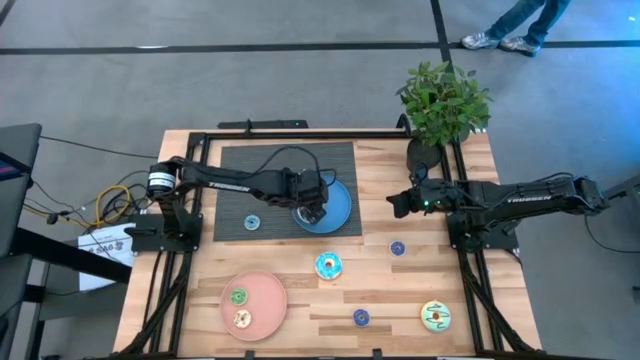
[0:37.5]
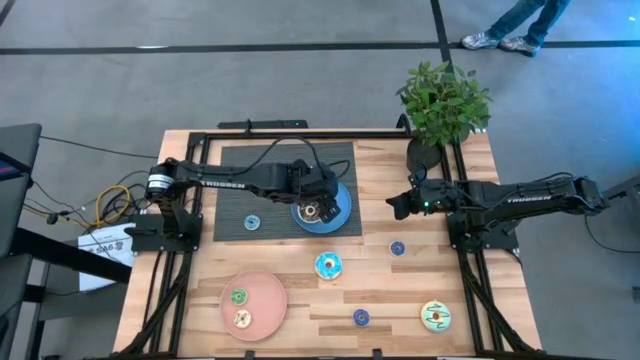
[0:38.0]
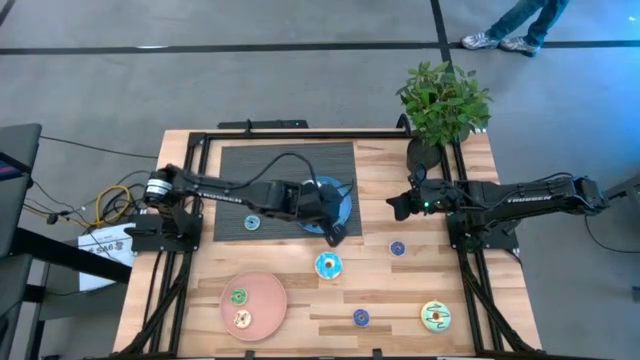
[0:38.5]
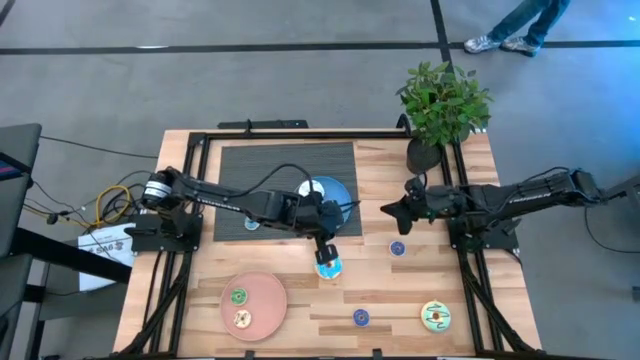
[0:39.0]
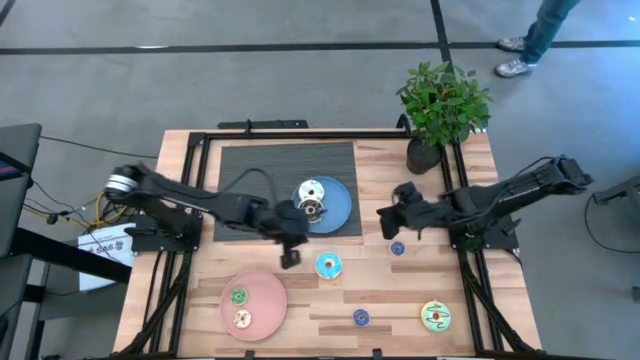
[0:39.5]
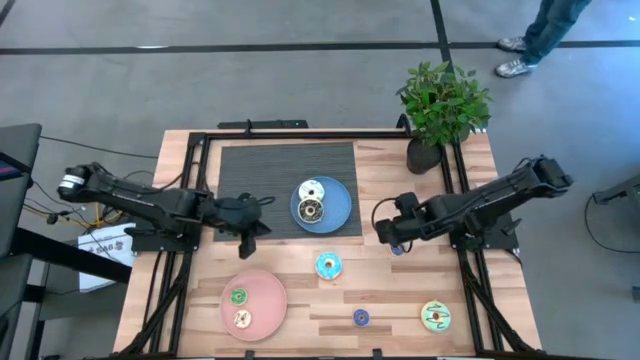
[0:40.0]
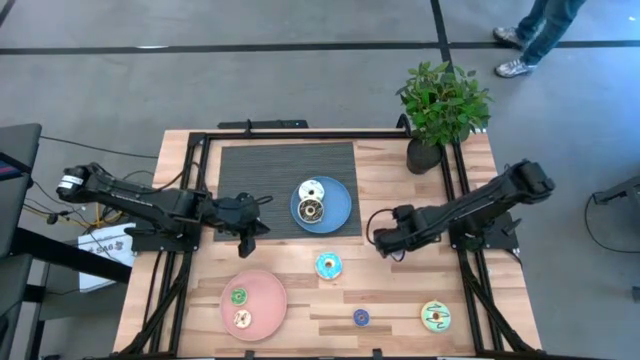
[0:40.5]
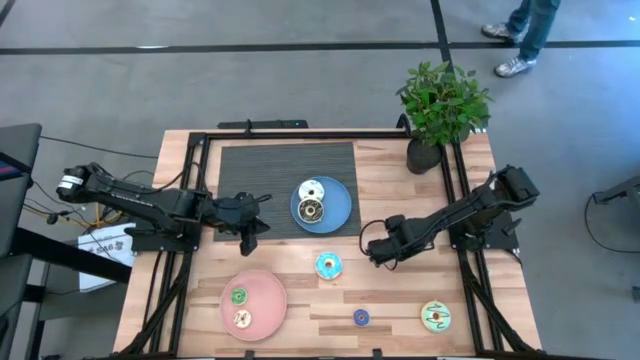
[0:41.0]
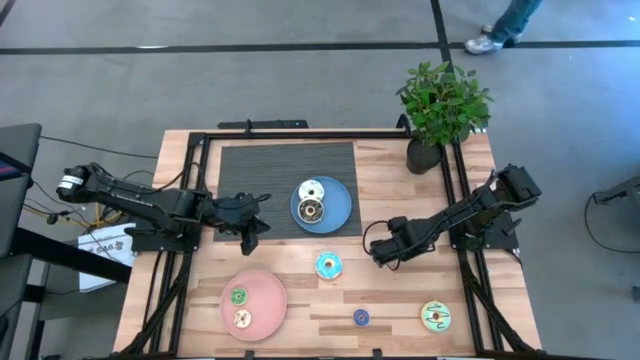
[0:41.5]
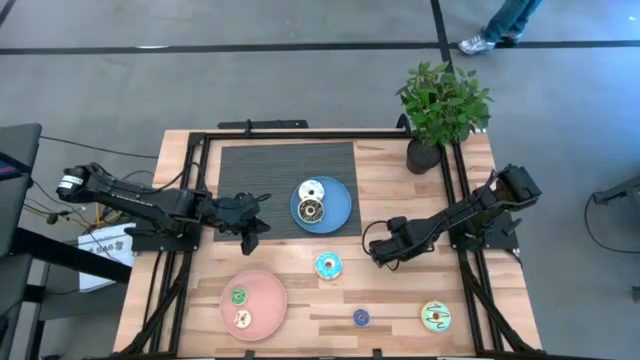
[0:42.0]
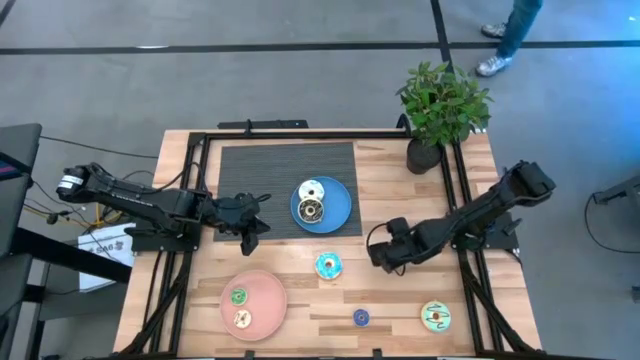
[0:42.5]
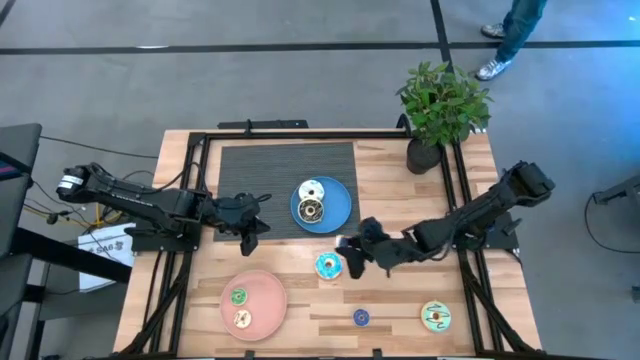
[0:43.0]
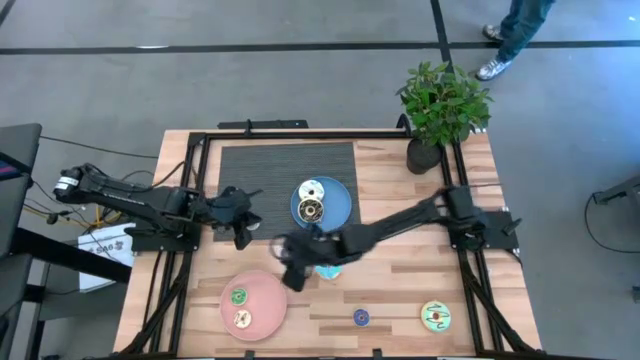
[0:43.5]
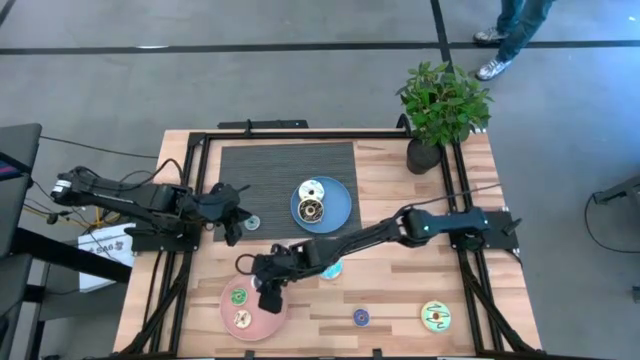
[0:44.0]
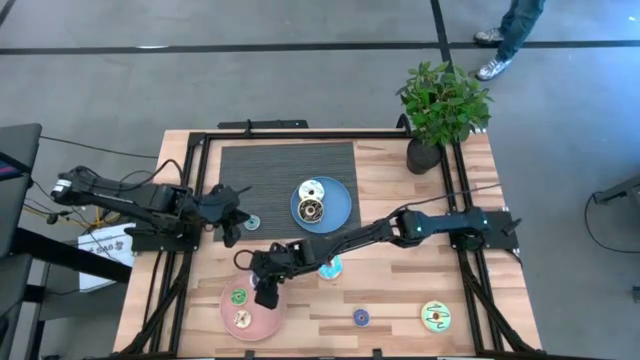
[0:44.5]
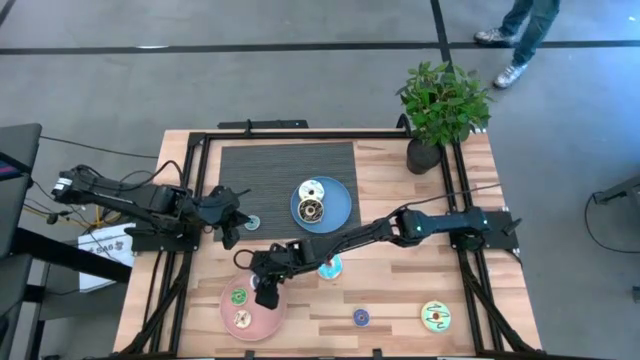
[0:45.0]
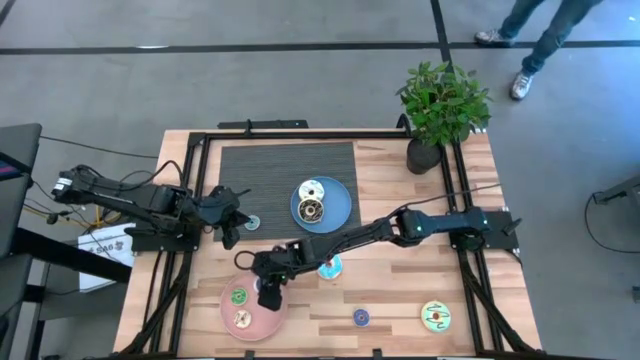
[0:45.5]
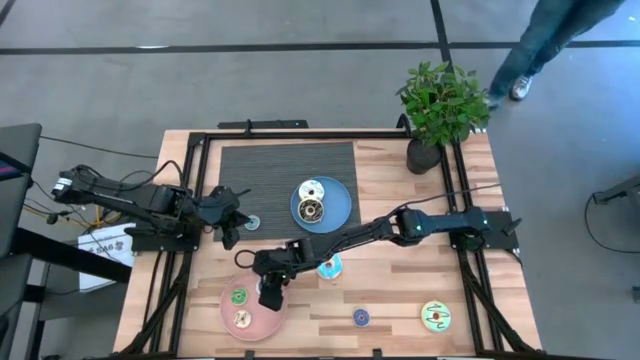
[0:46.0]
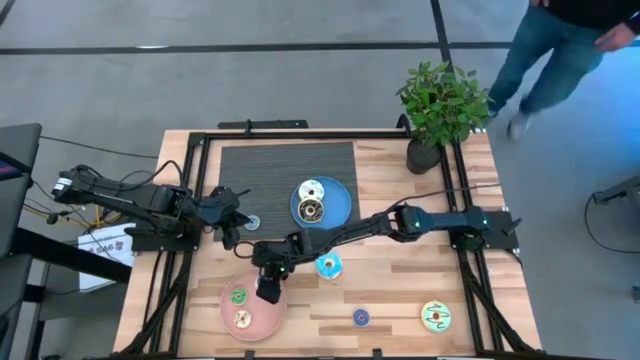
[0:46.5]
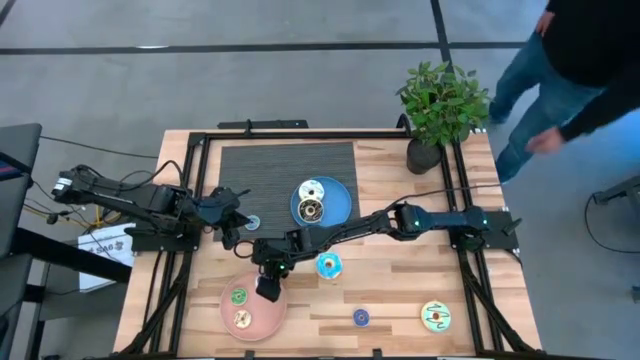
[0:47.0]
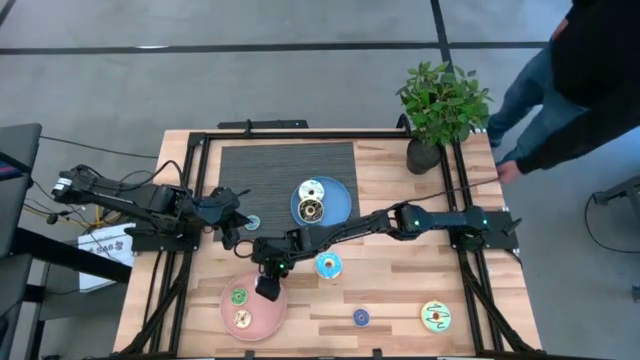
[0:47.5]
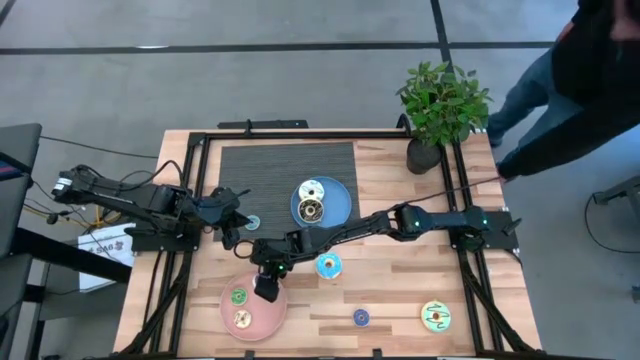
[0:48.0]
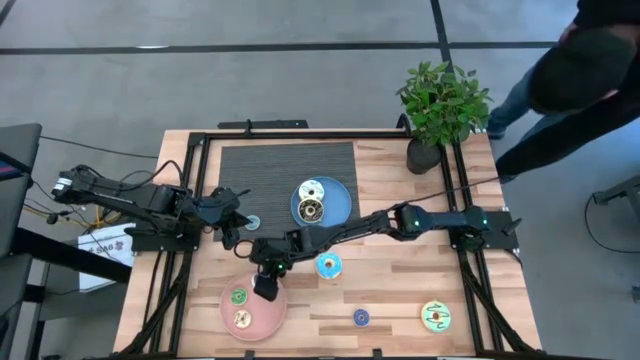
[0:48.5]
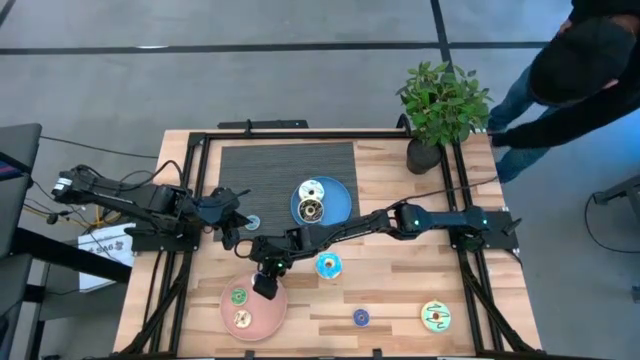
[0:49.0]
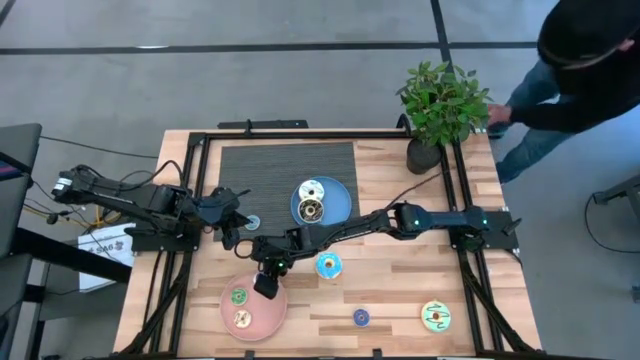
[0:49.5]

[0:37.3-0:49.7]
Task: Pick & Place donuts
Put the small dark blue donut on the pink plate

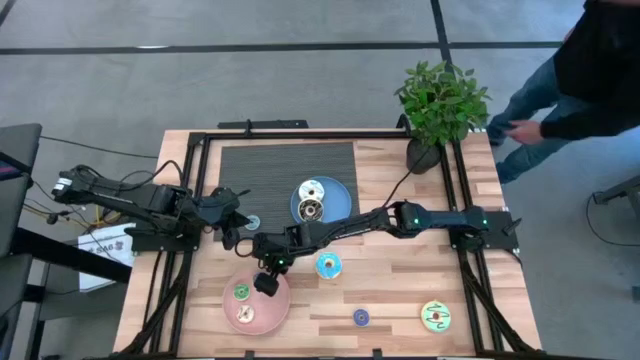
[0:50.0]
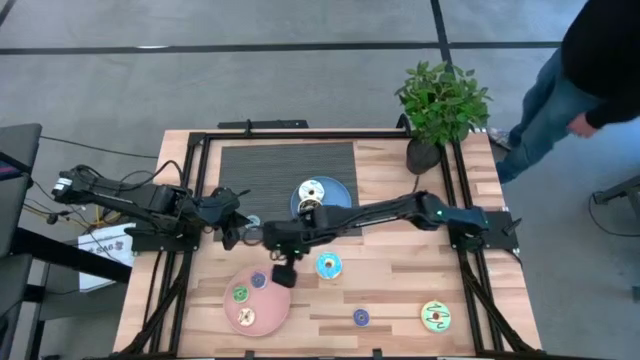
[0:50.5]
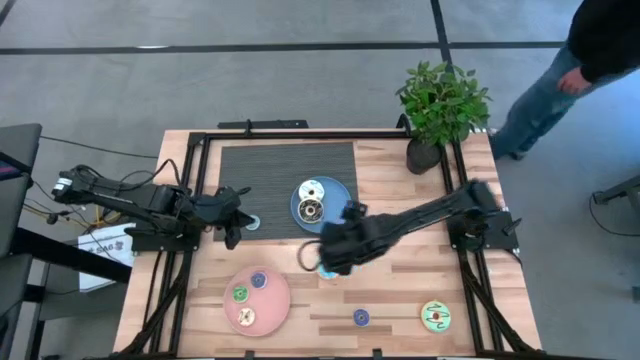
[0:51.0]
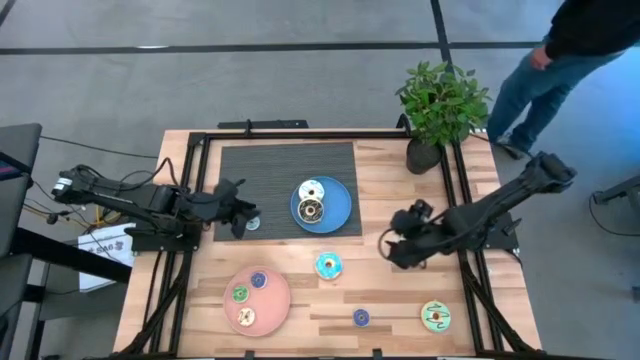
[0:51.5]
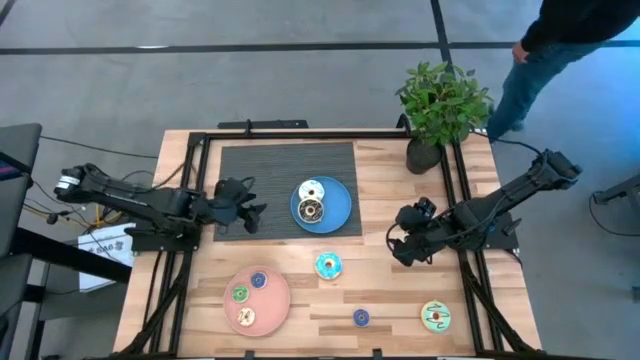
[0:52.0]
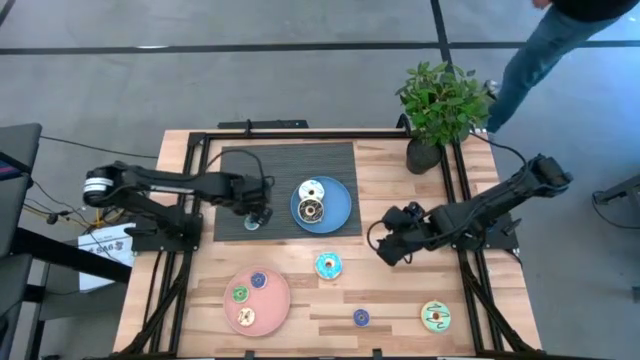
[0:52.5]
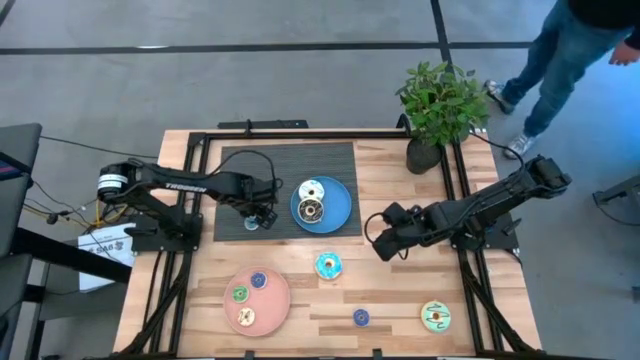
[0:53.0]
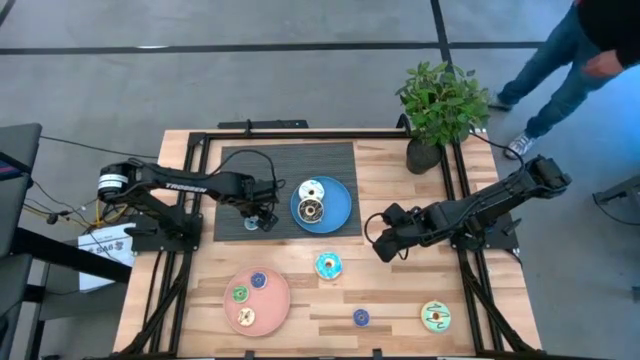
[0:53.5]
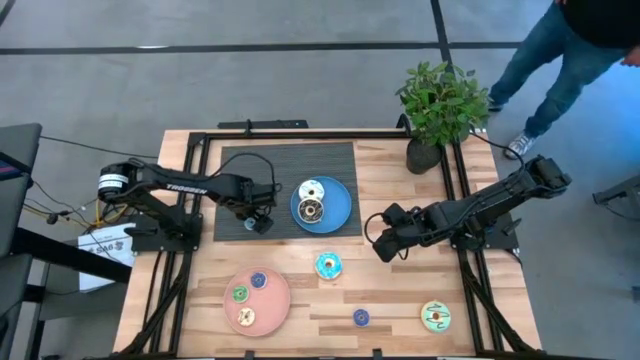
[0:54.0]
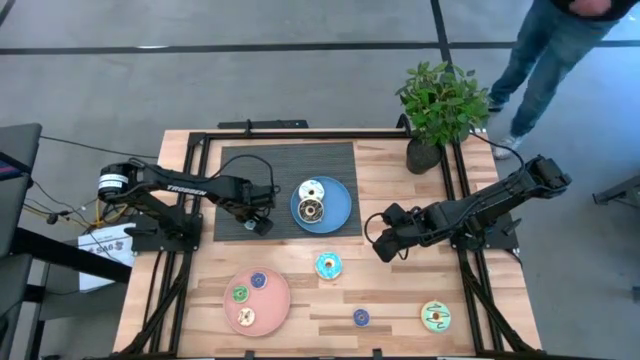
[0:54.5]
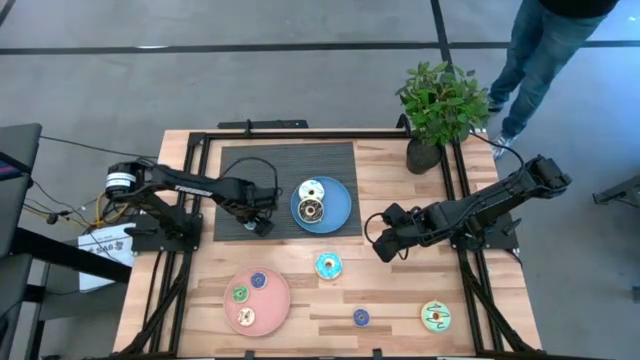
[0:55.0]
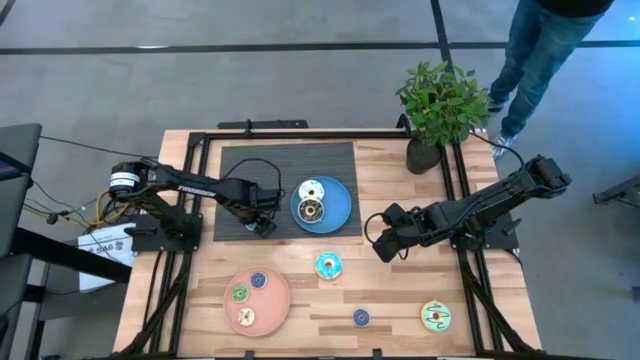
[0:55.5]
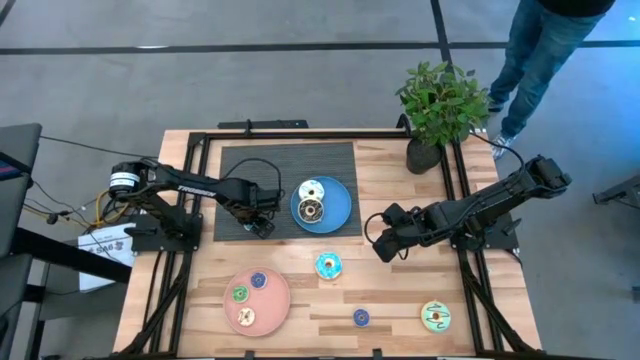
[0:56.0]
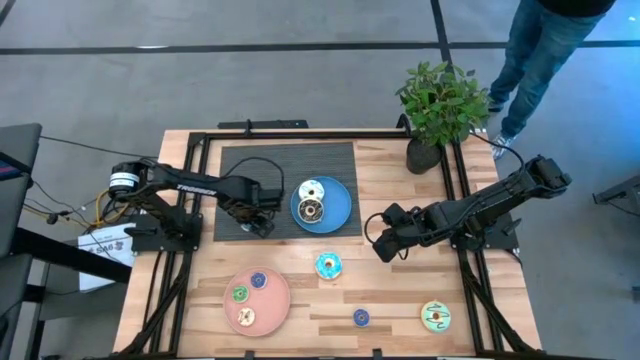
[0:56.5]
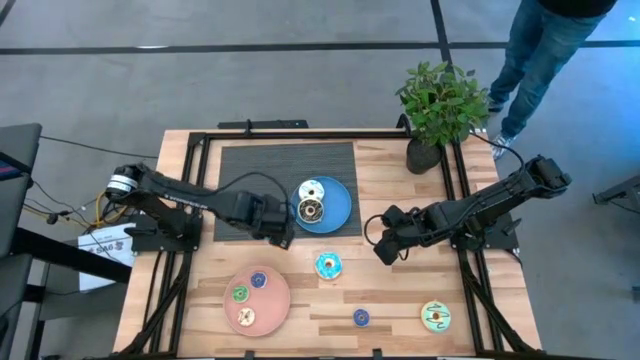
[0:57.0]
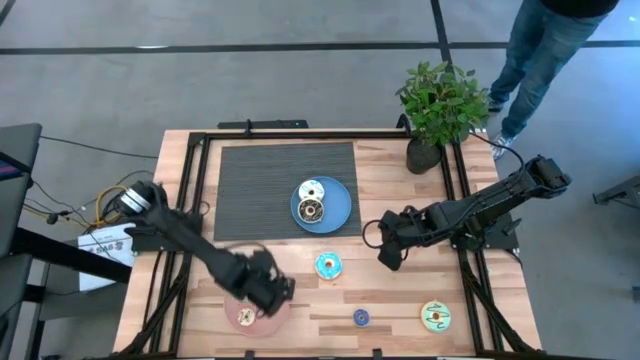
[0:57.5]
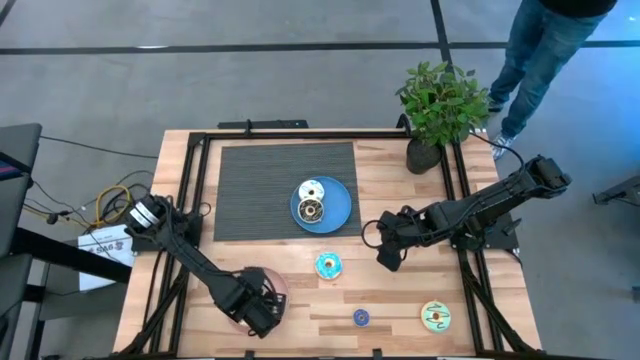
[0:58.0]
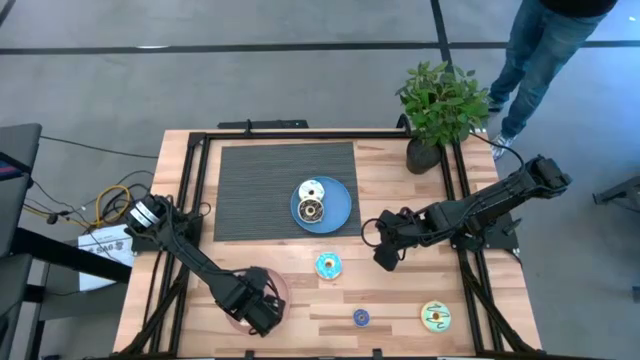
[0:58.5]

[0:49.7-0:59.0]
Put the small blue donut on the pink plate

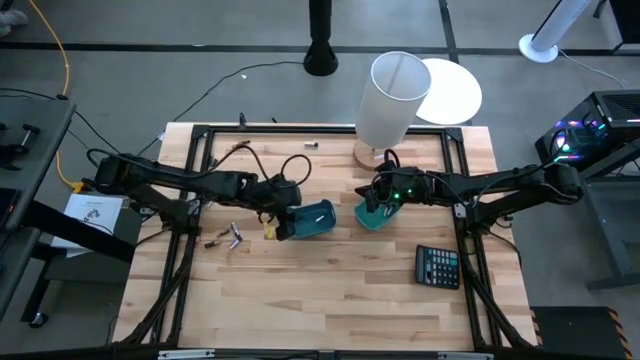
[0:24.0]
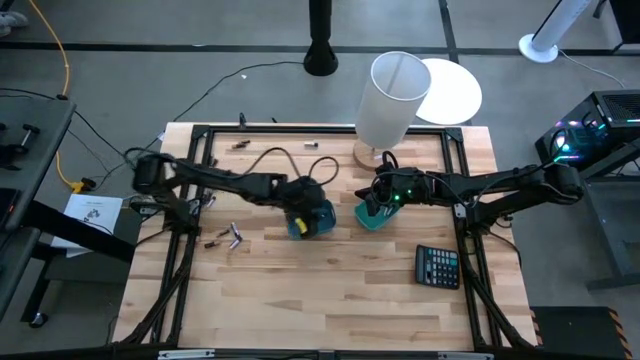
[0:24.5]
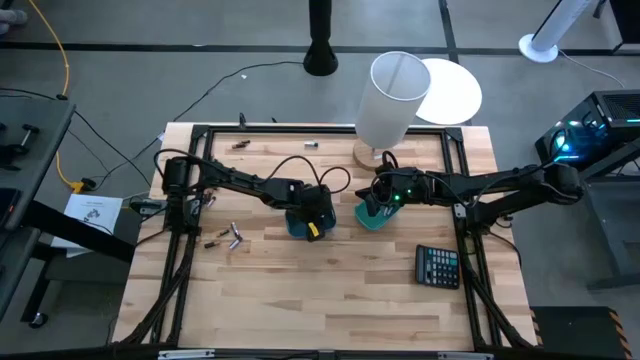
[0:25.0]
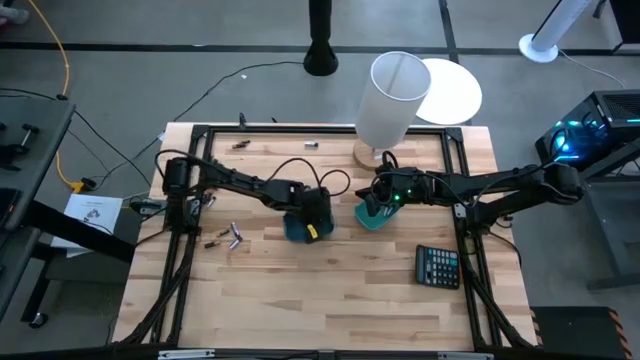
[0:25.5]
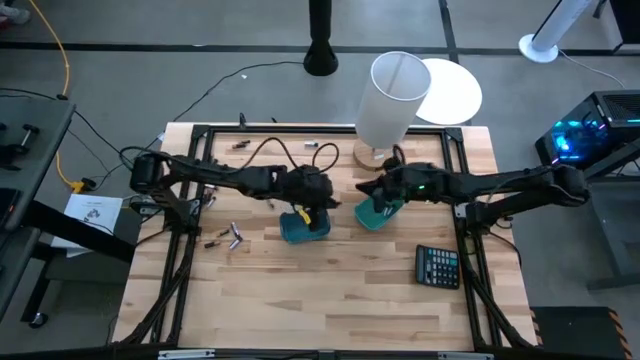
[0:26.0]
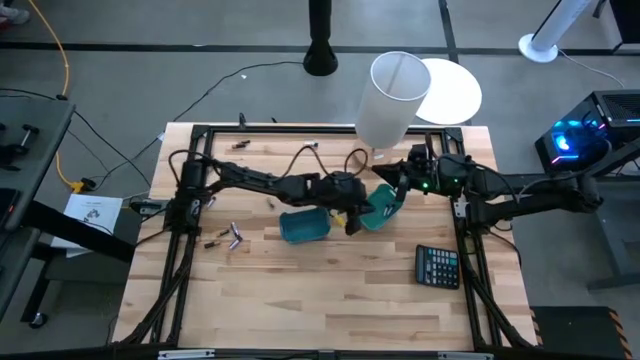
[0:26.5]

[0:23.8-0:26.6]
Task: Sort batteries
Move the silver battery into the green bin
